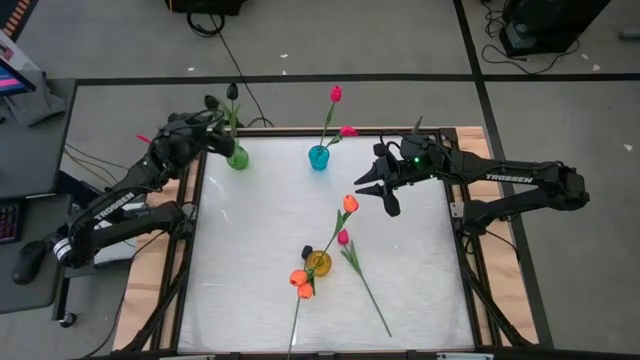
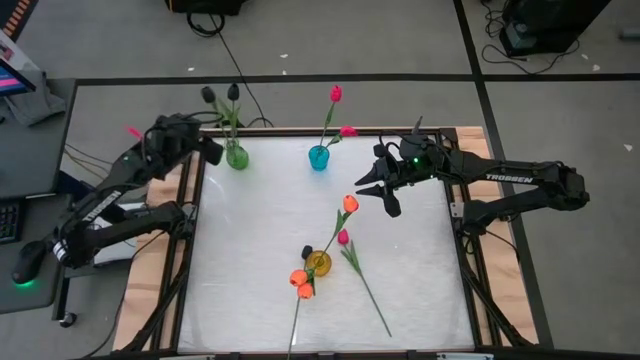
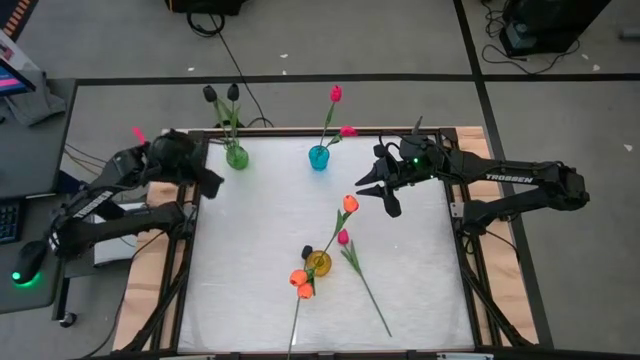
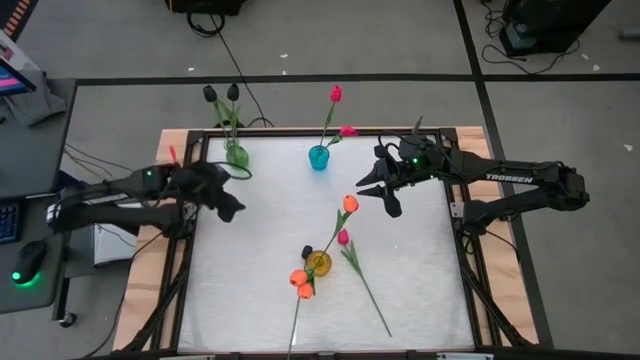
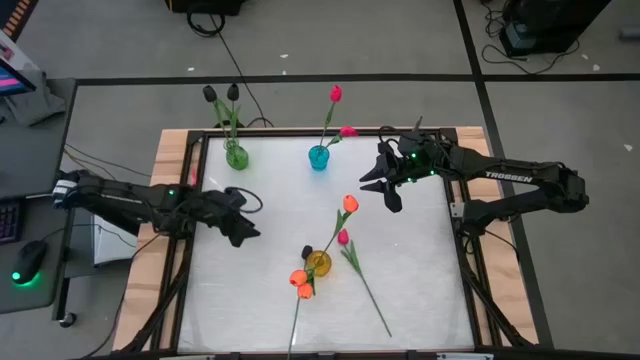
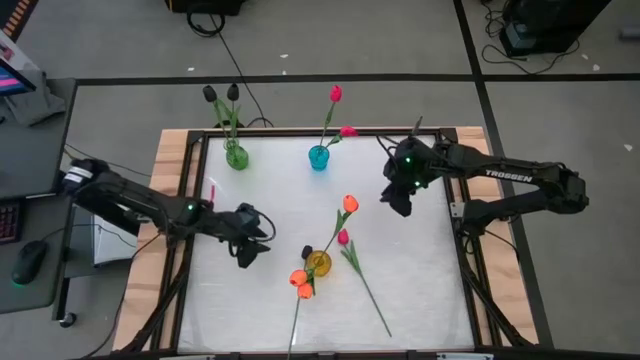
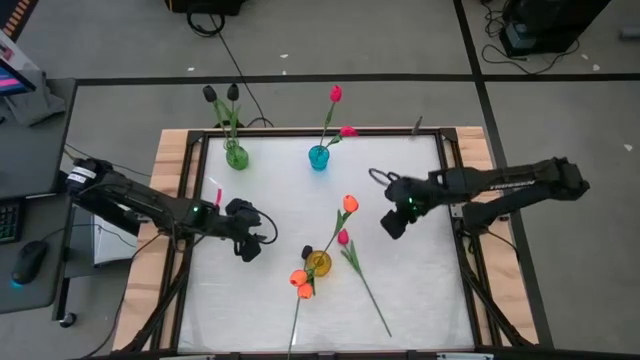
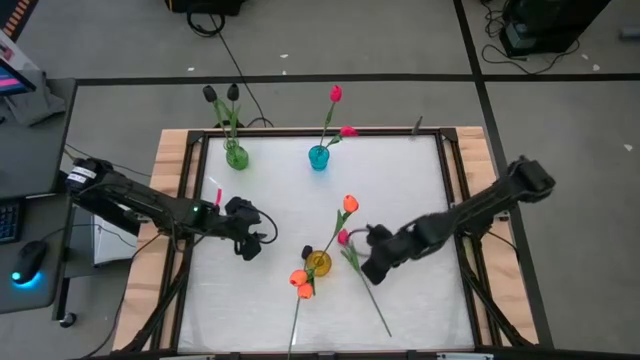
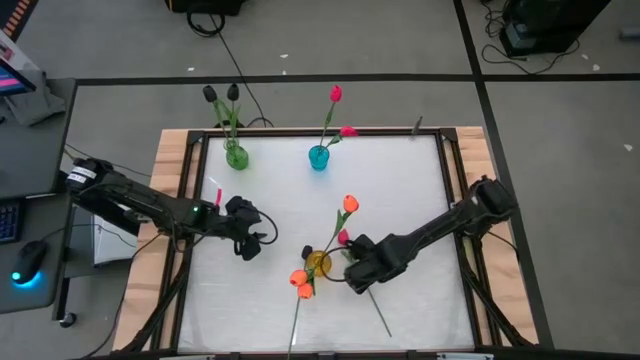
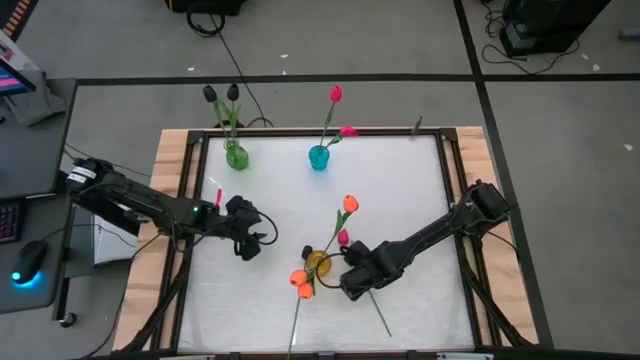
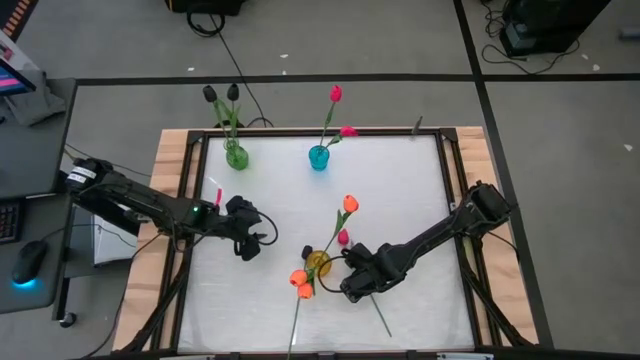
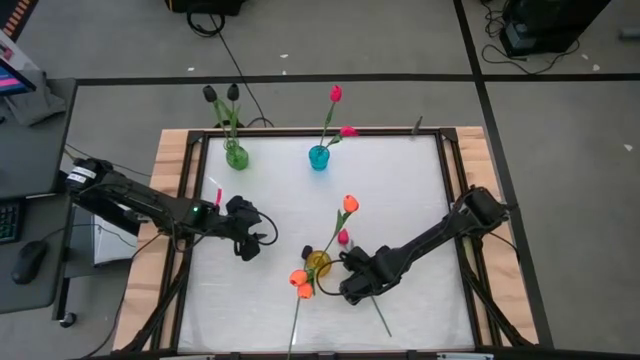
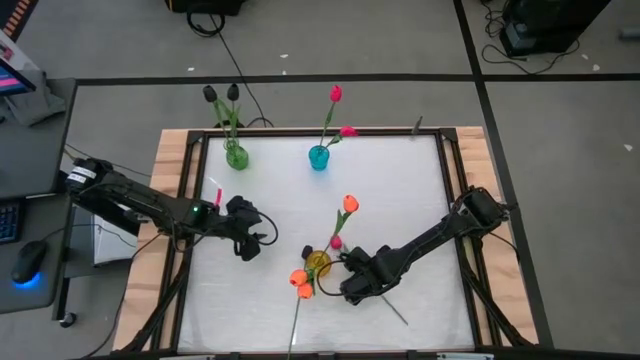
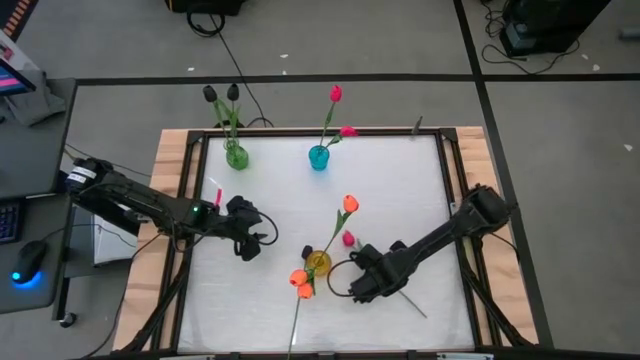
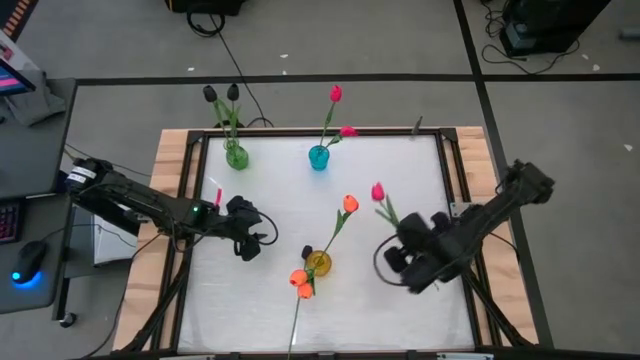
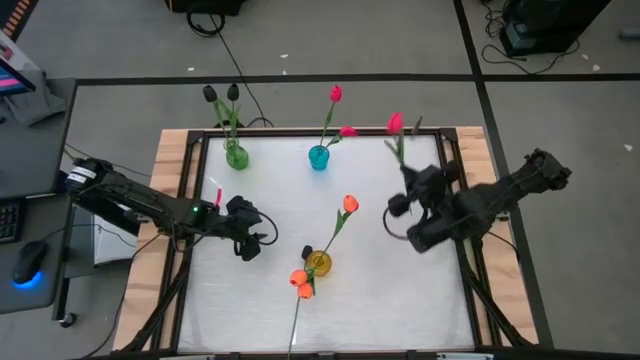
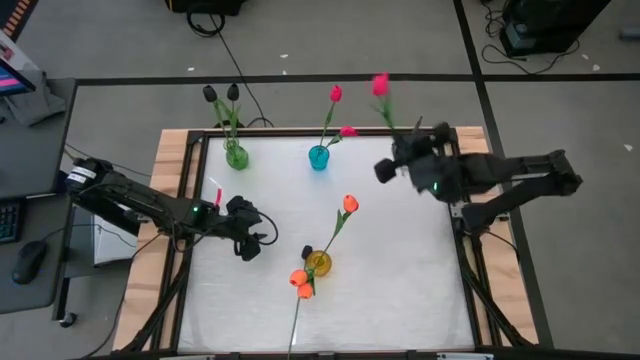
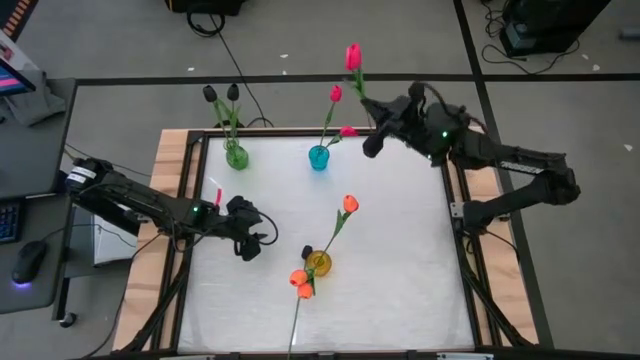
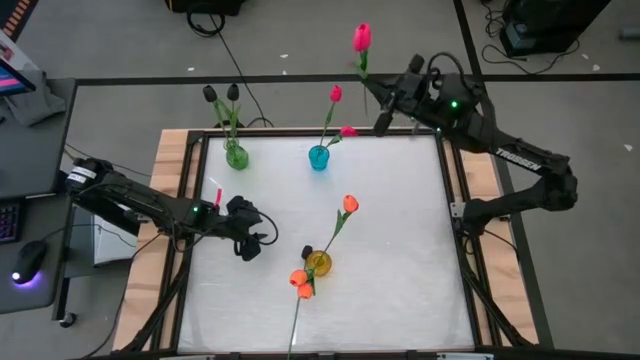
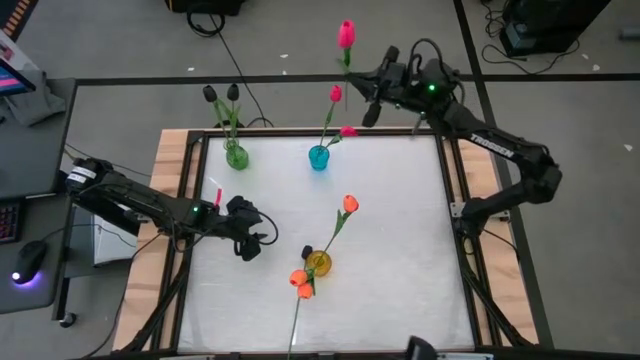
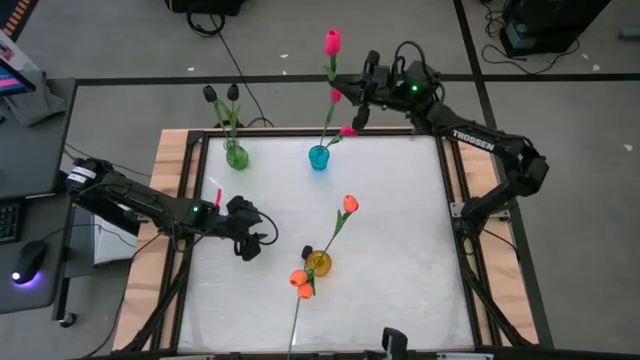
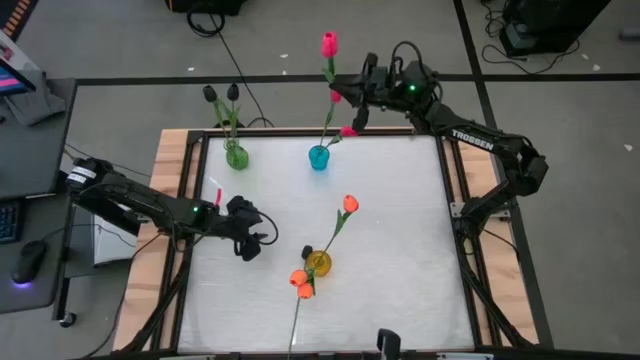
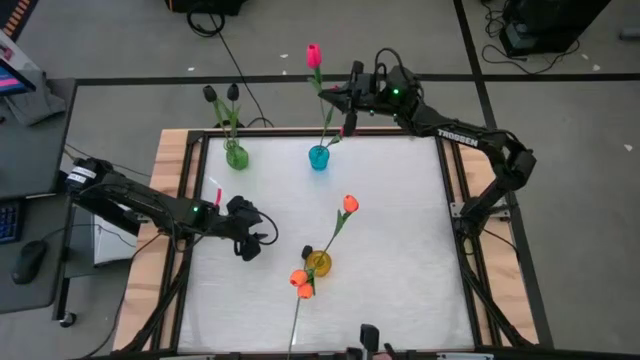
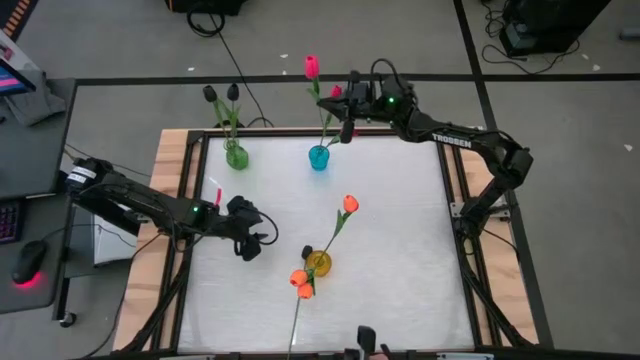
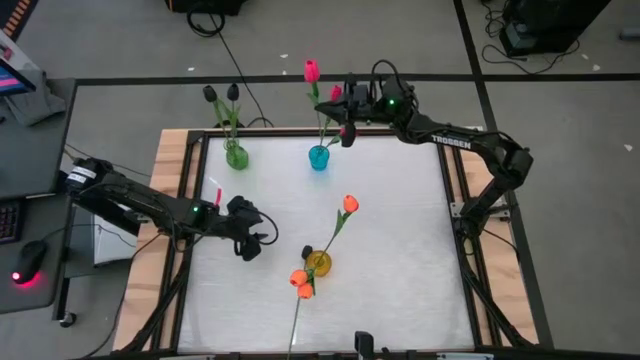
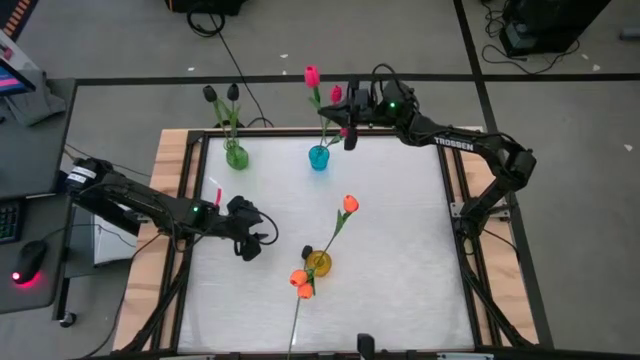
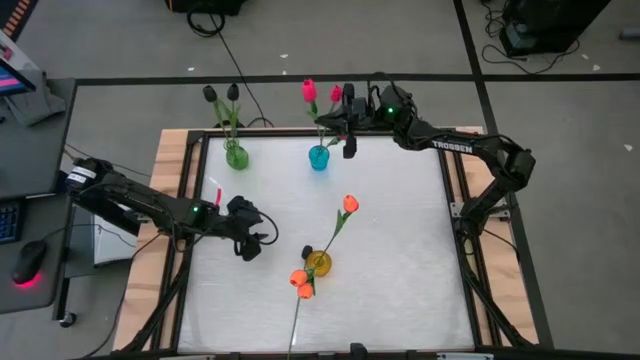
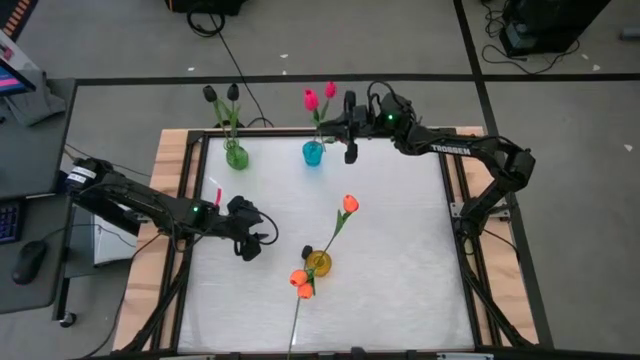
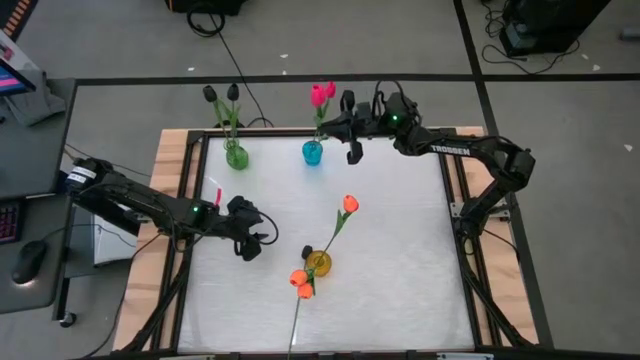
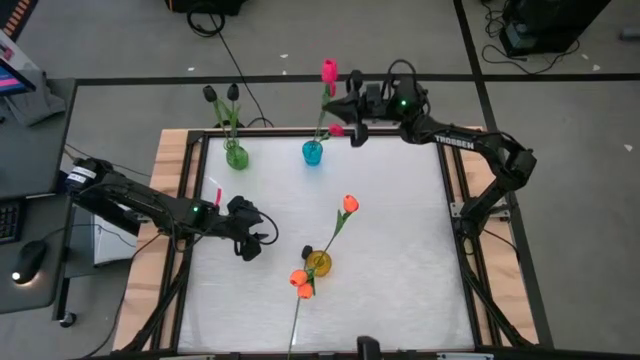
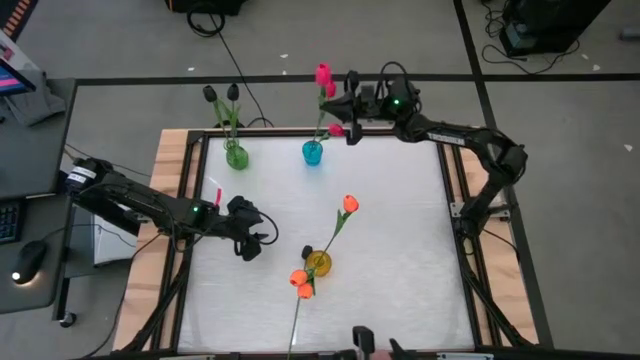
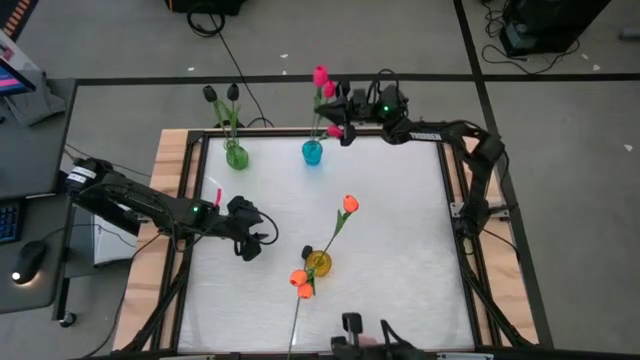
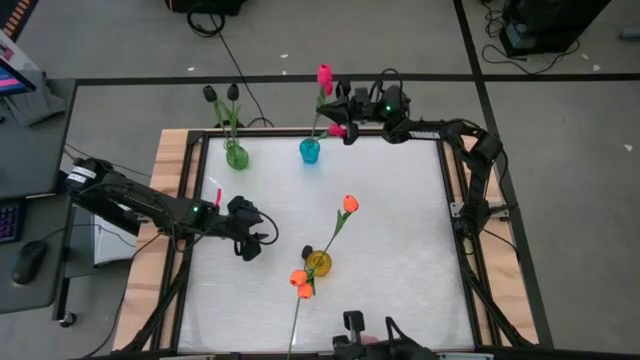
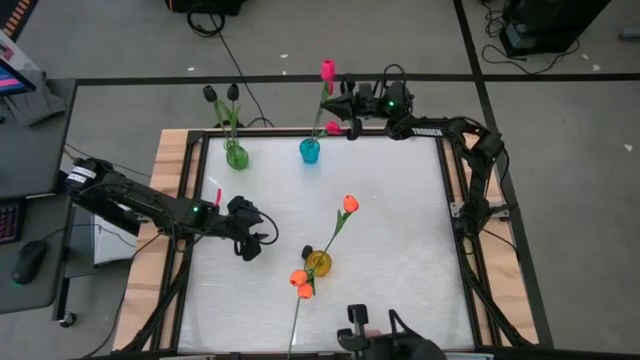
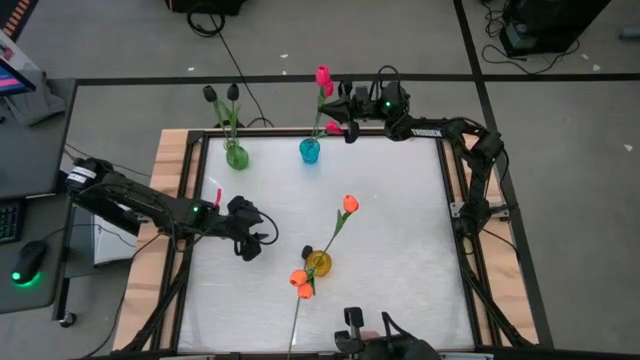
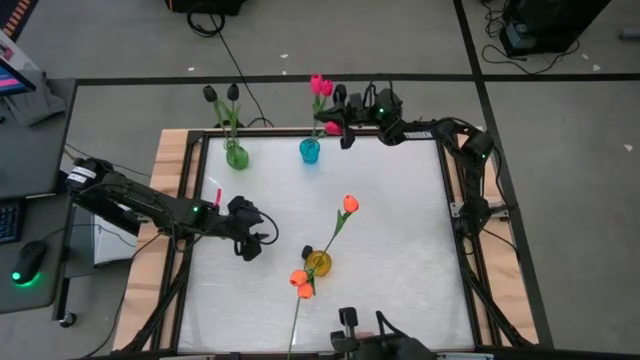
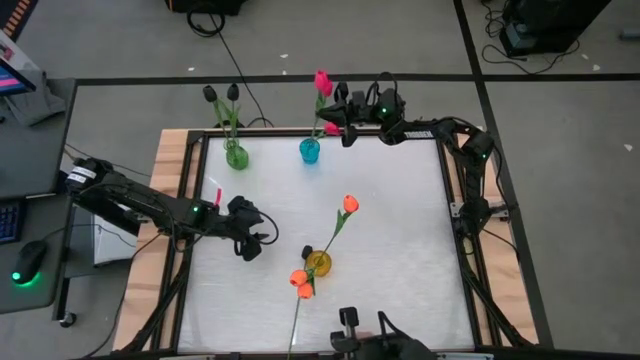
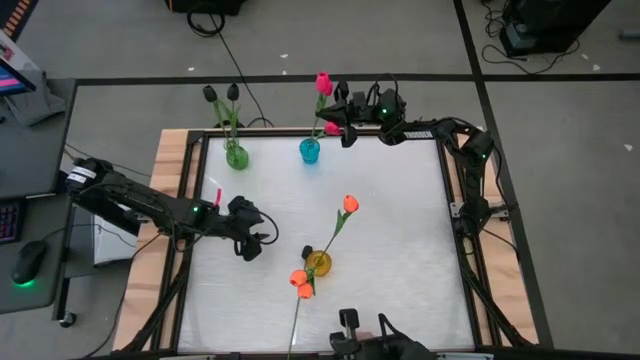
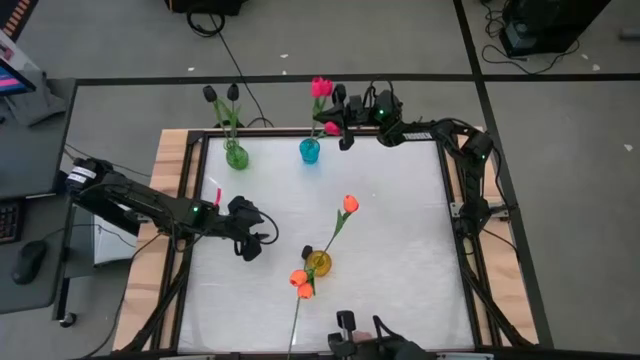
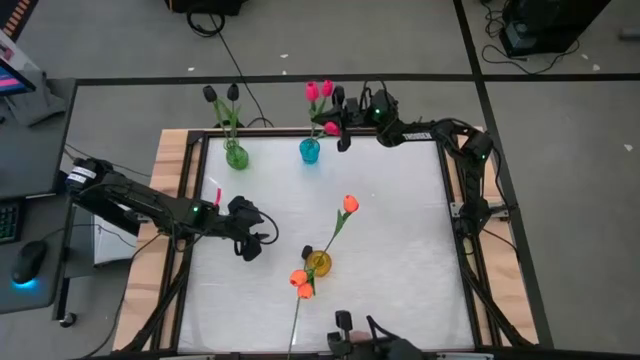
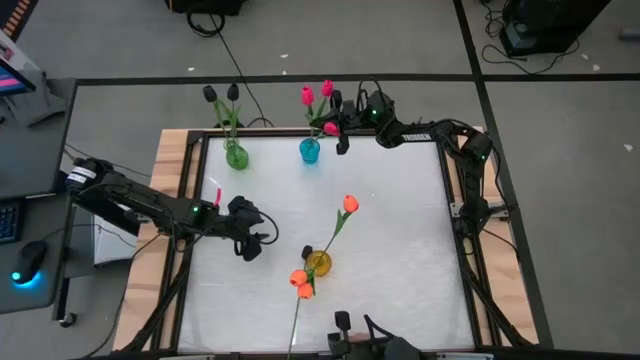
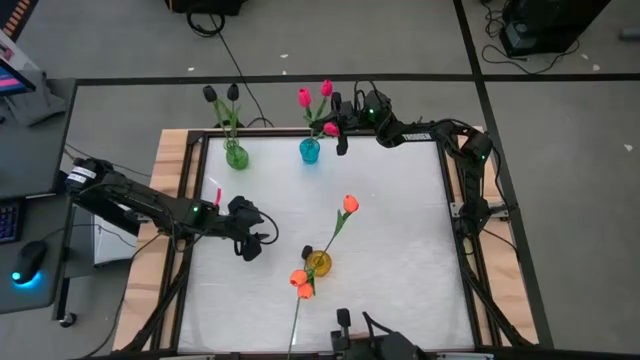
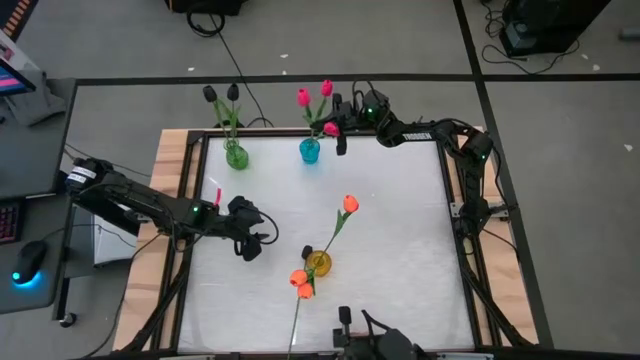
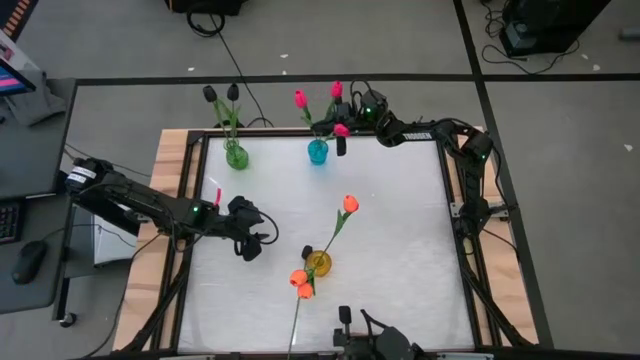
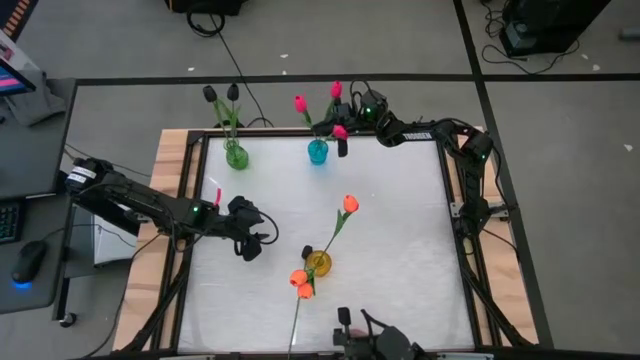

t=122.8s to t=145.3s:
Task: Sort flowers into vase by color
Put the pink flower into the blue vase
